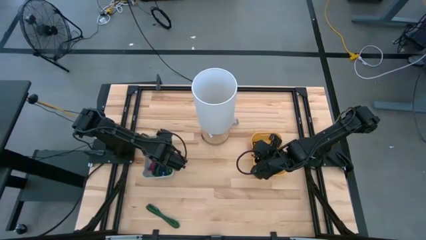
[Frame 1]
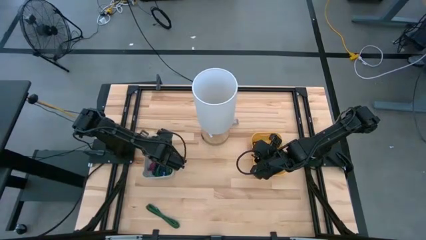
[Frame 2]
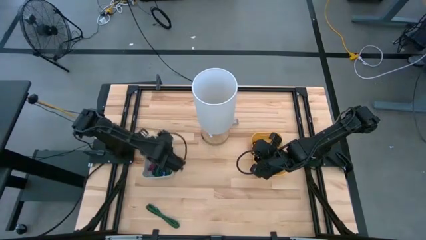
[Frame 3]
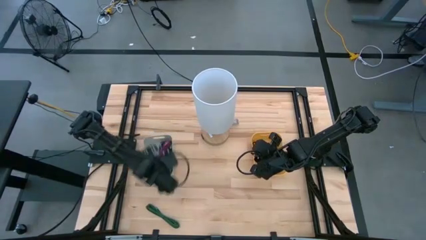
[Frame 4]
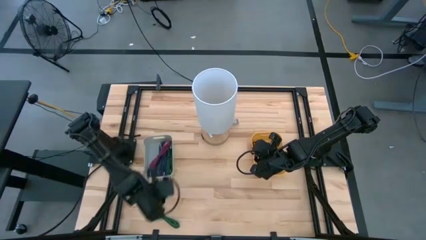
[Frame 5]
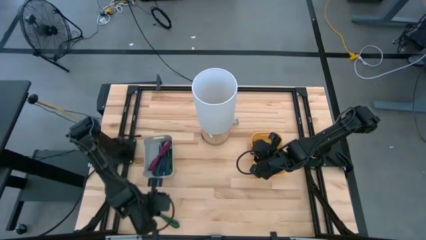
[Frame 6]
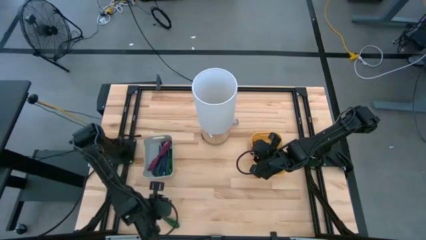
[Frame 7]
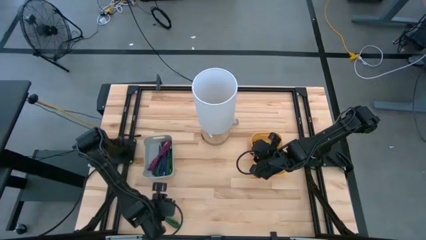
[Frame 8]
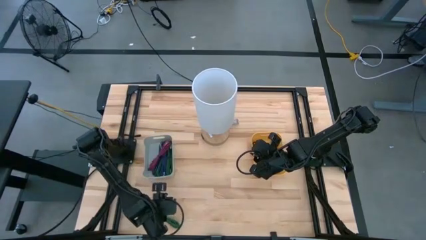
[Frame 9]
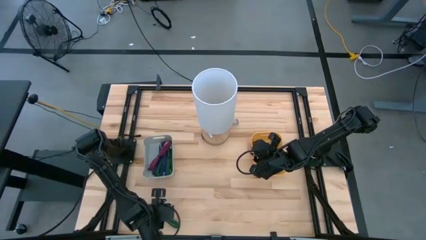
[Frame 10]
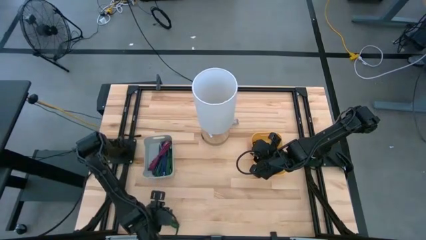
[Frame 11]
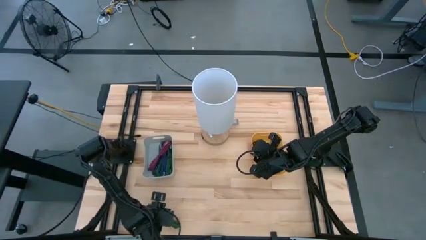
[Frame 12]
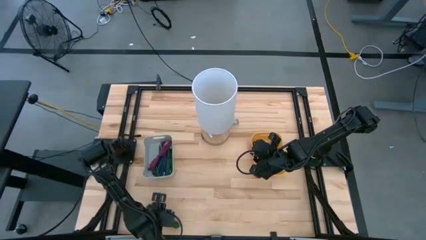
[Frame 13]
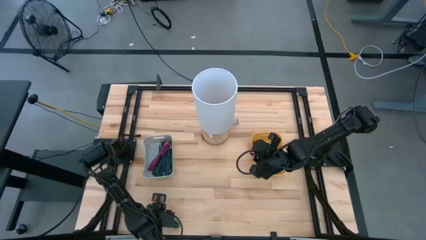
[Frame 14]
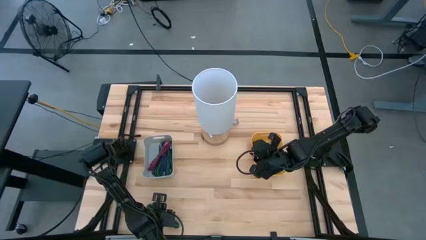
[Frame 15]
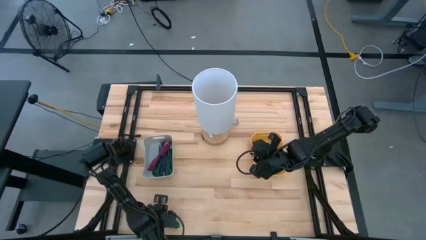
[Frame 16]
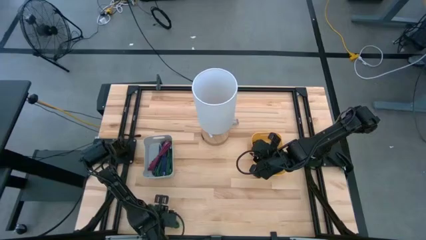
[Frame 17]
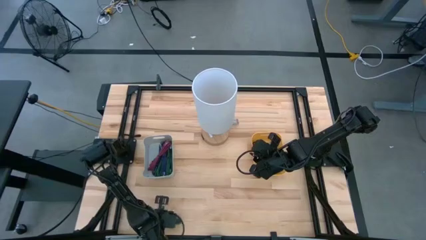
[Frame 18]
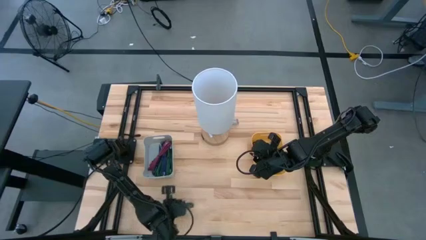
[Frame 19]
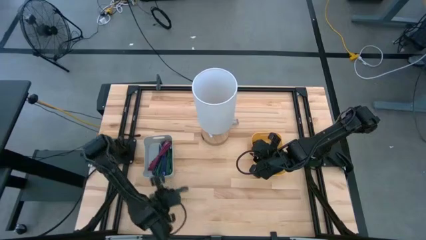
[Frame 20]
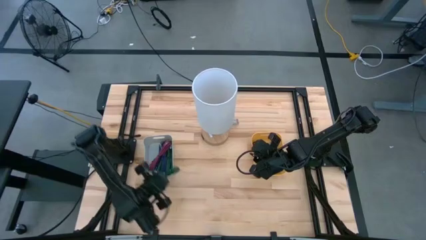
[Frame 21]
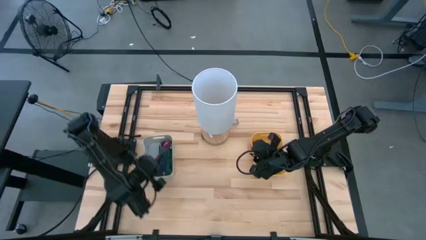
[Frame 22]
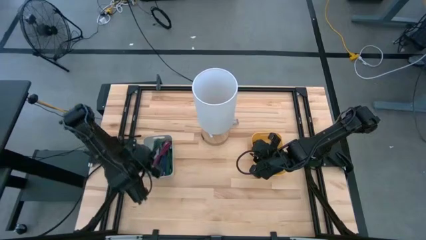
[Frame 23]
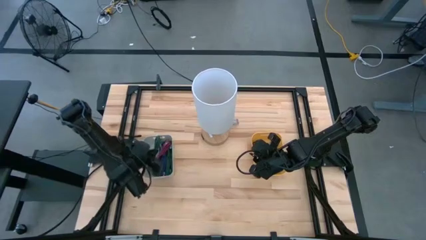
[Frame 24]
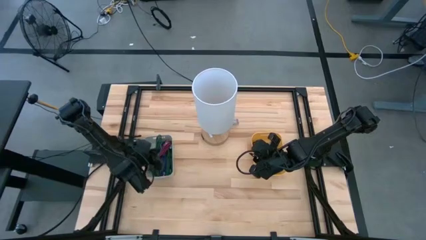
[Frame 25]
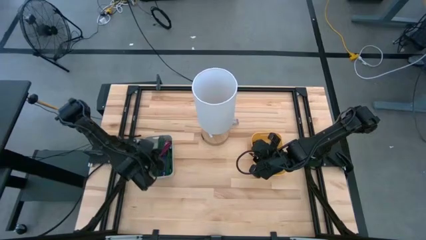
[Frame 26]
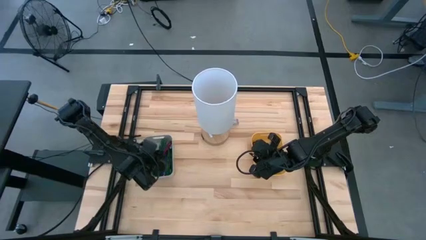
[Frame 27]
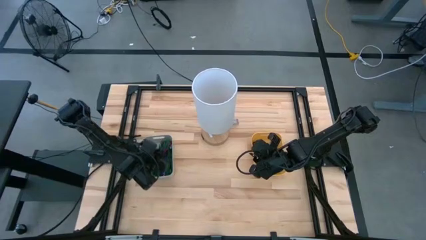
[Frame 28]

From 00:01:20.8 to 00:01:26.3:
Task: Pick & Place USB Port
Put the green patterned USB charger into the gray bin

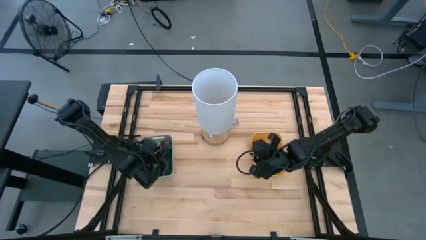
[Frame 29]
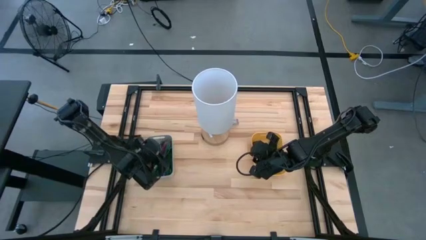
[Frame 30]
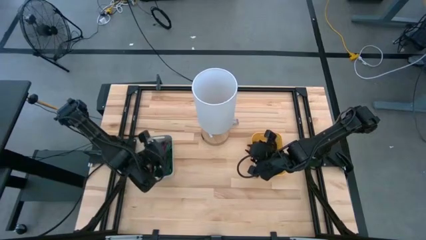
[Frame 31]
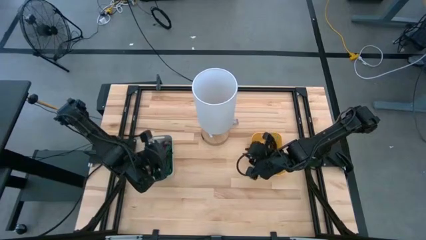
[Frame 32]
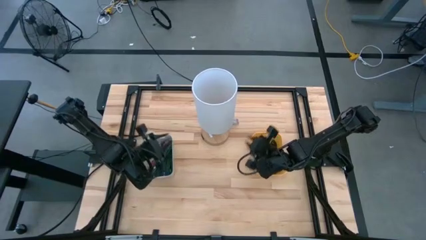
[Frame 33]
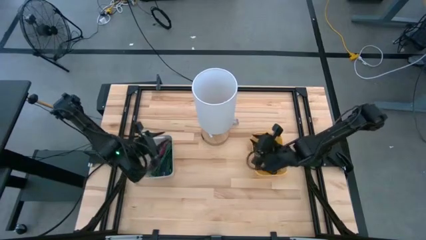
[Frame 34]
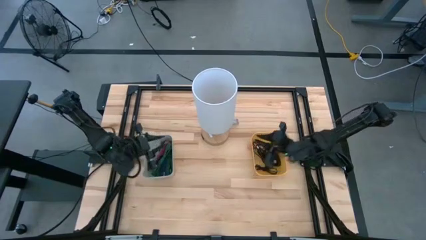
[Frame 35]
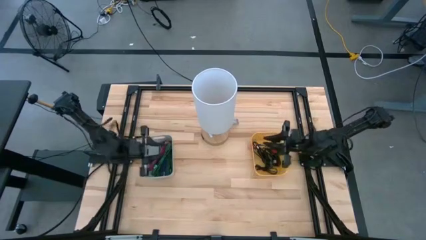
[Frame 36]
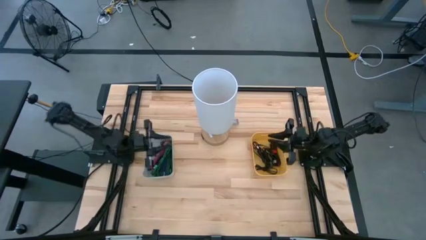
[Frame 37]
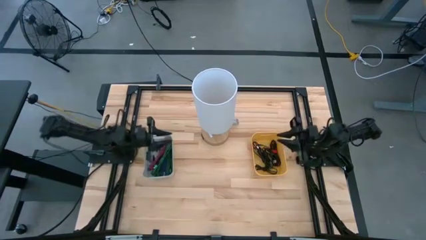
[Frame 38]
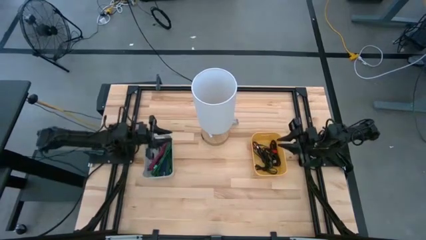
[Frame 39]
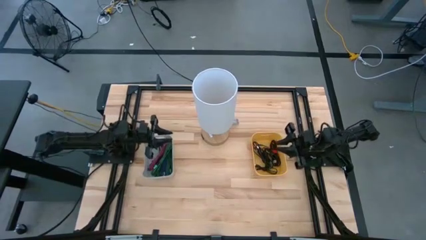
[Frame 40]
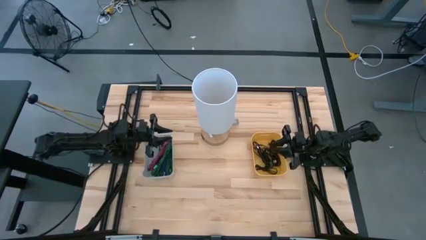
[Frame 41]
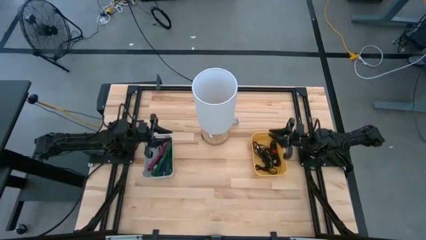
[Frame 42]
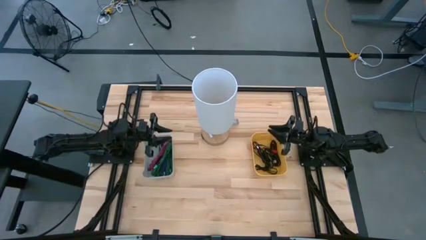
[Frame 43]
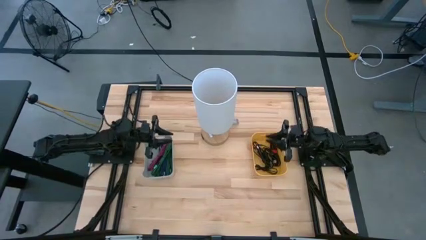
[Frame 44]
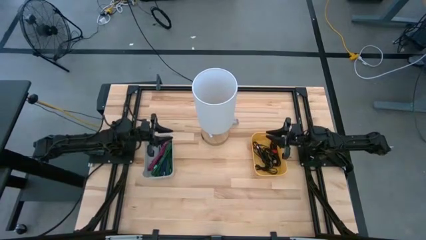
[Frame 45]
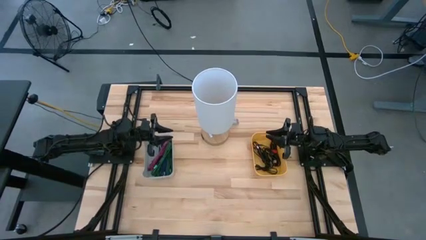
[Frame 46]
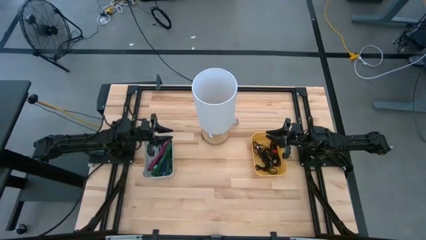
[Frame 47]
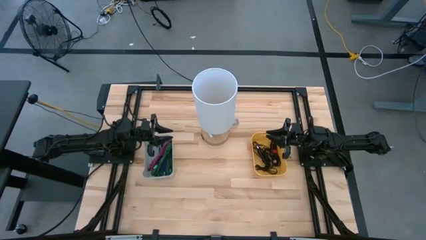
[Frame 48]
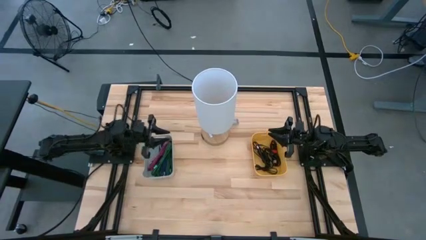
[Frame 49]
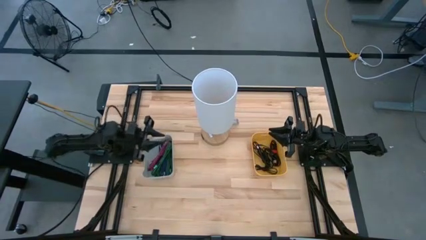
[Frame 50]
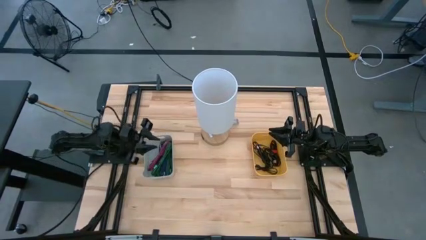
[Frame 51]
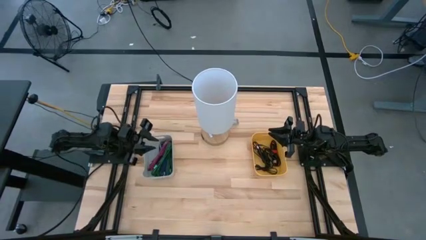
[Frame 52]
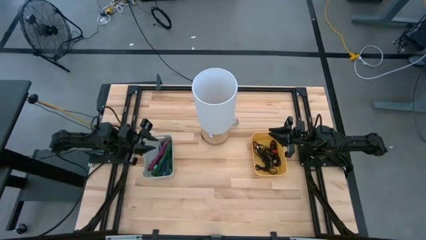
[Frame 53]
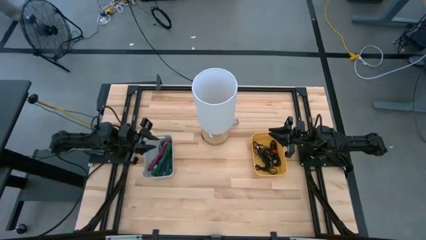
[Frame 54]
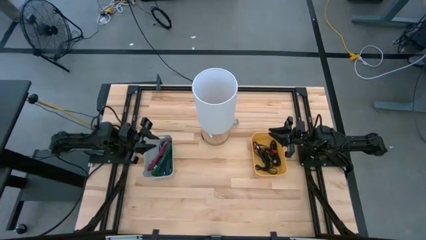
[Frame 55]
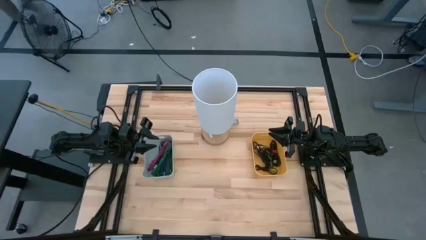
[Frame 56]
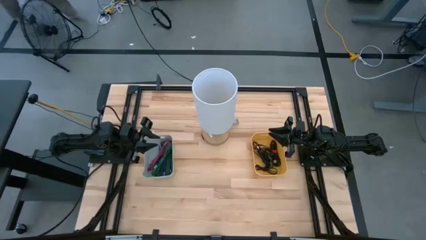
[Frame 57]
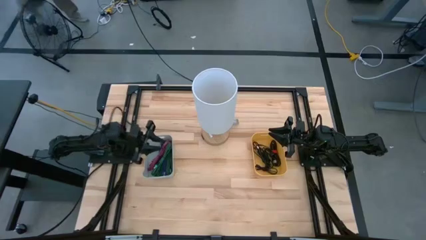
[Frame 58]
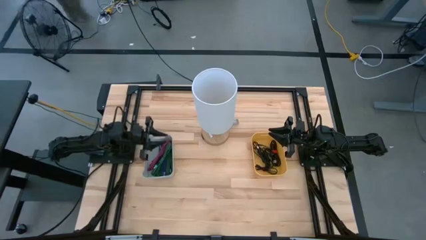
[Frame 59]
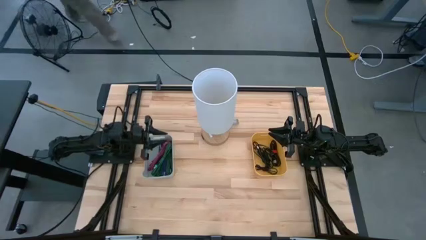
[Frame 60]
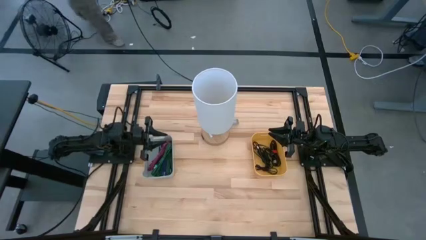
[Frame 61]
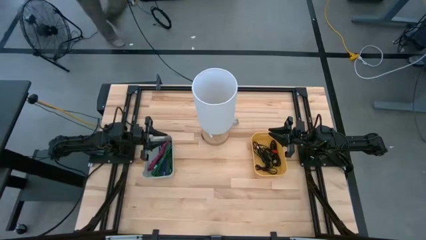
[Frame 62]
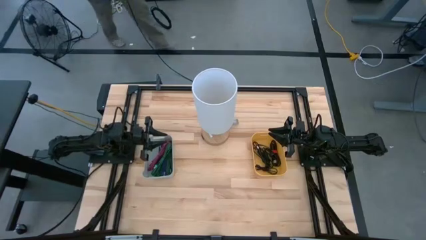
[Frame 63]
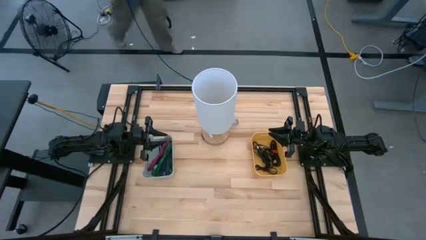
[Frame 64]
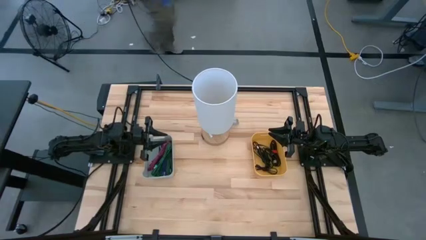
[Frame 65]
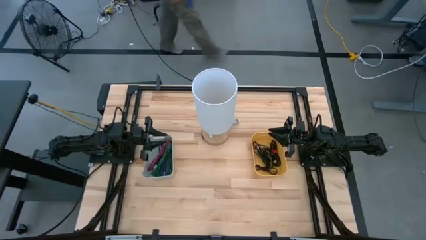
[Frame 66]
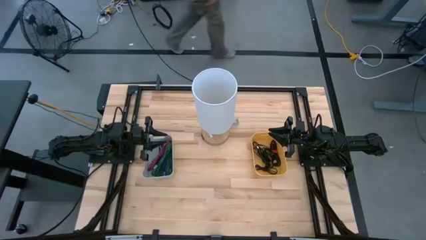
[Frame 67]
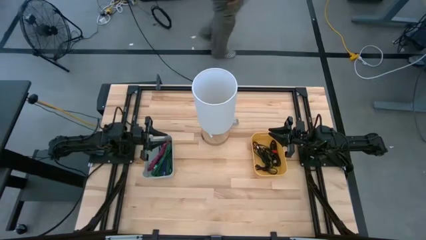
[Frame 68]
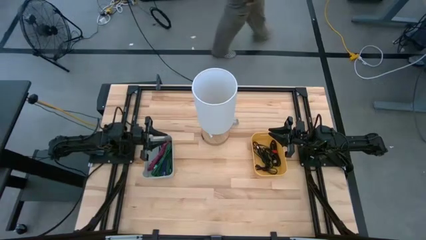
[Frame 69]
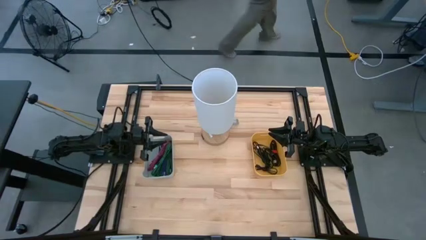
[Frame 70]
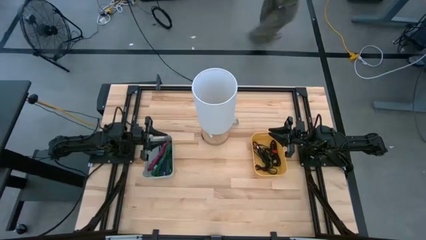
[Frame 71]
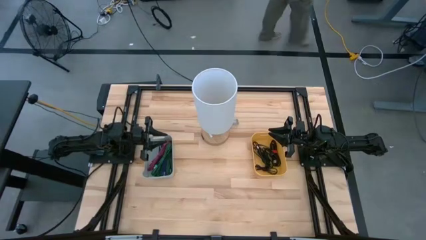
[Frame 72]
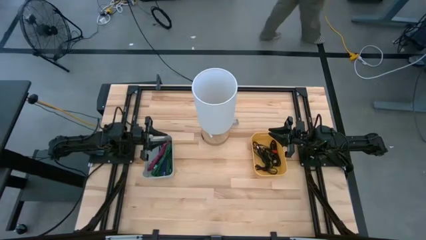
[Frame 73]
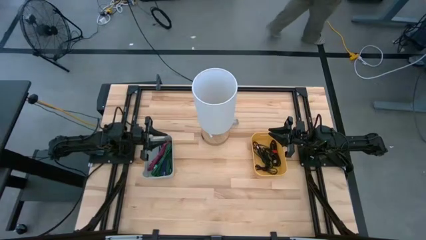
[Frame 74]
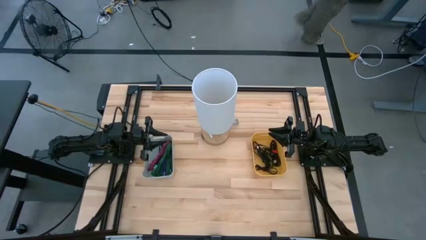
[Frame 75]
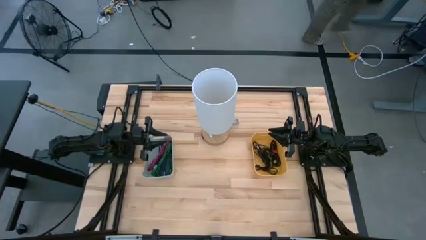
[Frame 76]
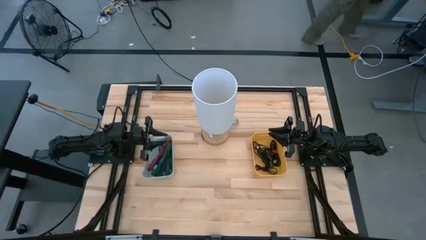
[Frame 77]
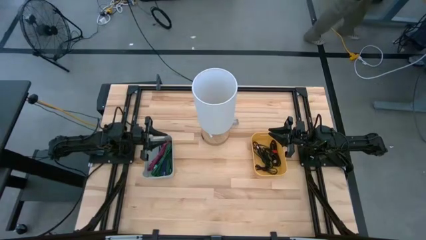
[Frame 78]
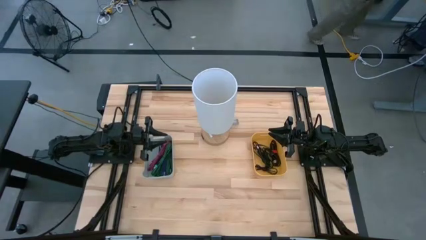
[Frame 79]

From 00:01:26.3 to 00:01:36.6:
Return to home position

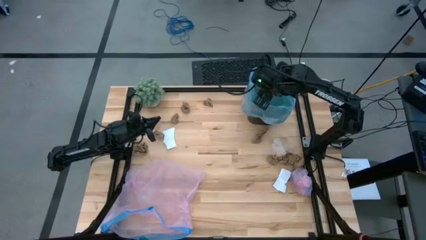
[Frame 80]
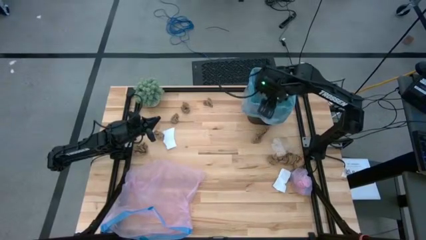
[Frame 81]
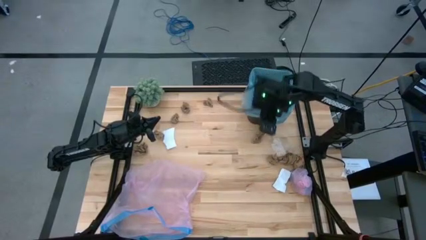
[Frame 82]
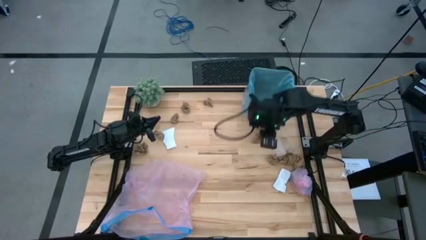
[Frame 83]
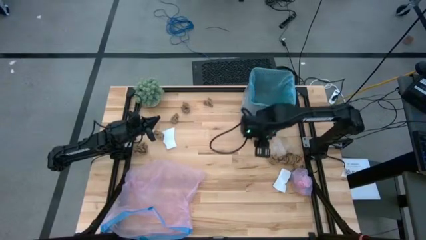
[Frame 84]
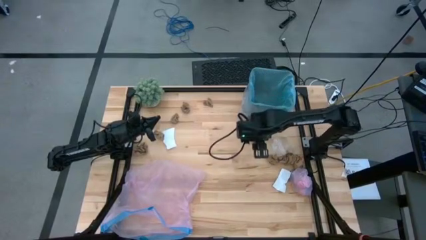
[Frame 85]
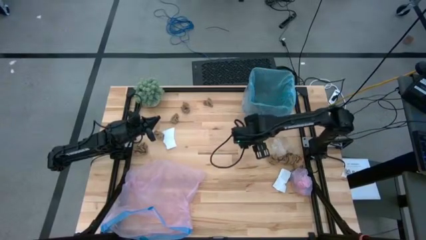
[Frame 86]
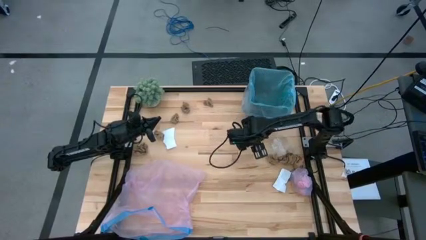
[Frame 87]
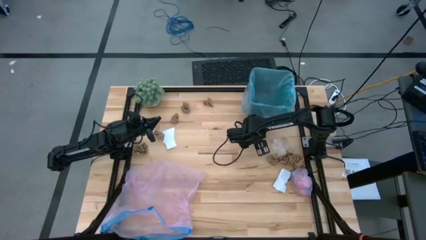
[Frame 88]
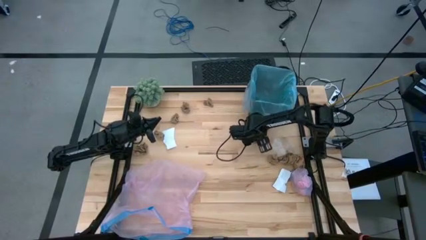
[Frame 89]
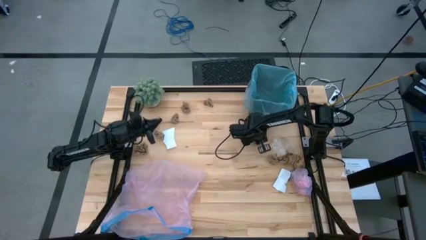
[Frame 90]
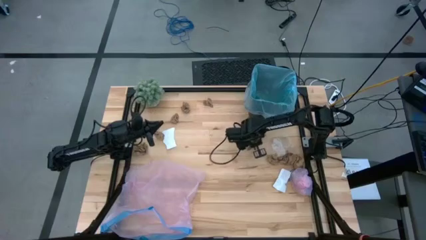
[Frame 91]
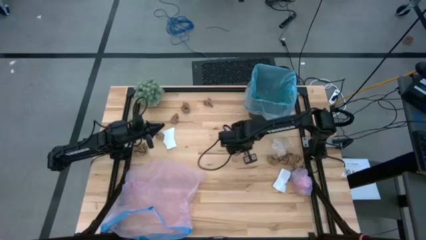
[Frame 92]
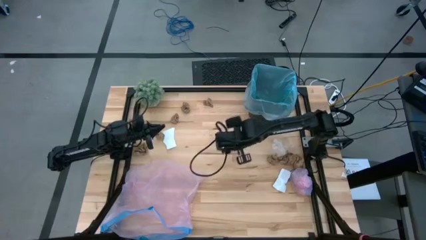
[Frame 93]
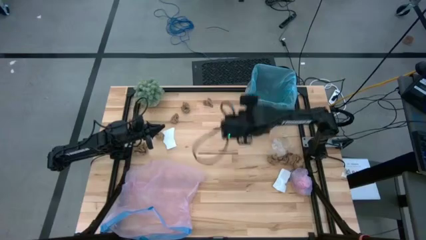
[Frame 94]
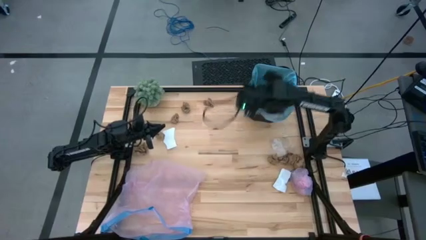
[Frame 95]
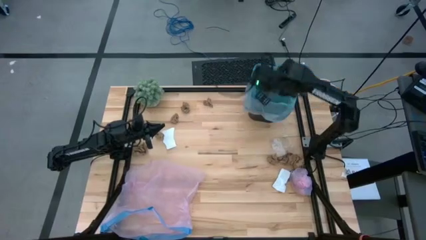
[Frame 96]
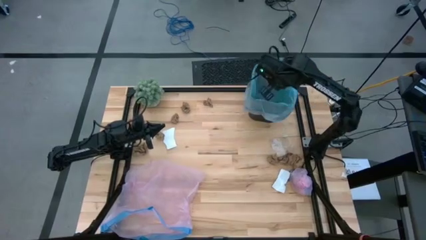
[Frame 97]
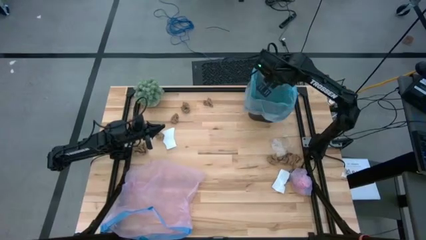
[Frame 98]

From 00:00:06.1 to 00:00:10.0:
Task: place trash/remove bag and relplace
Put the brown napkin into the trash bin
